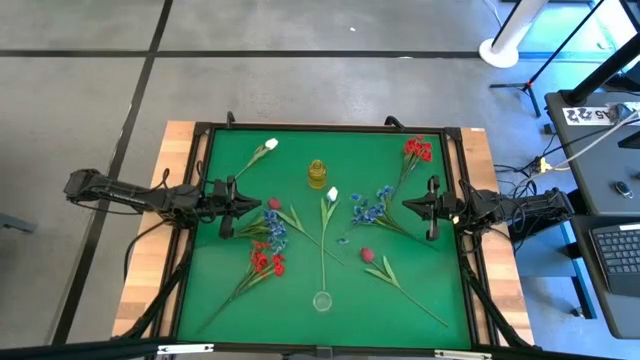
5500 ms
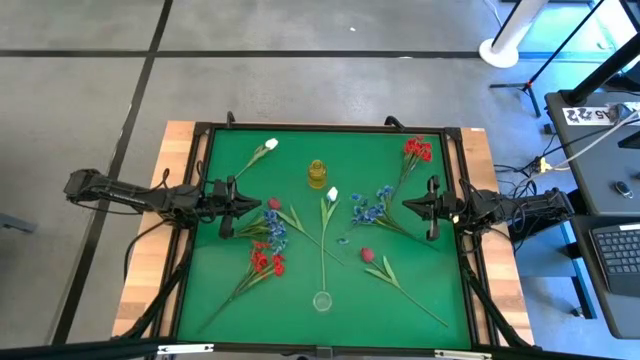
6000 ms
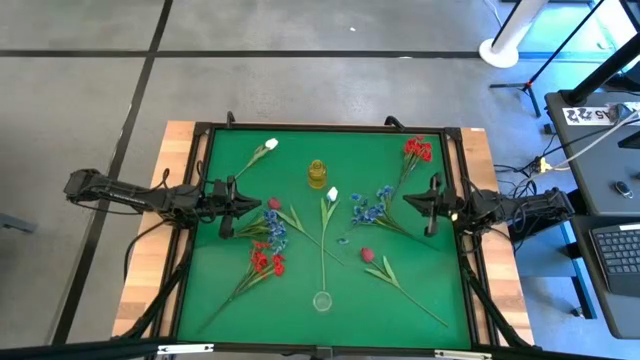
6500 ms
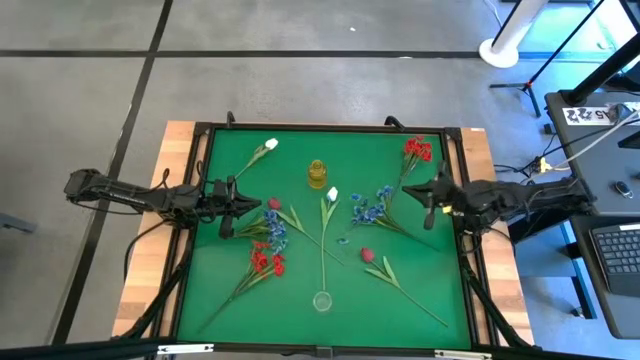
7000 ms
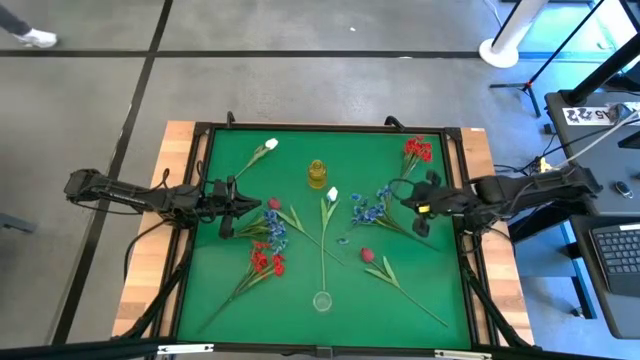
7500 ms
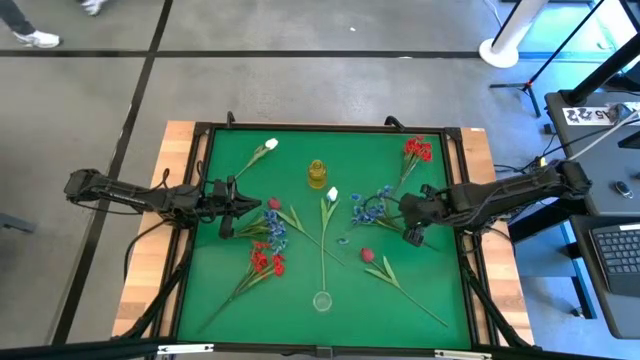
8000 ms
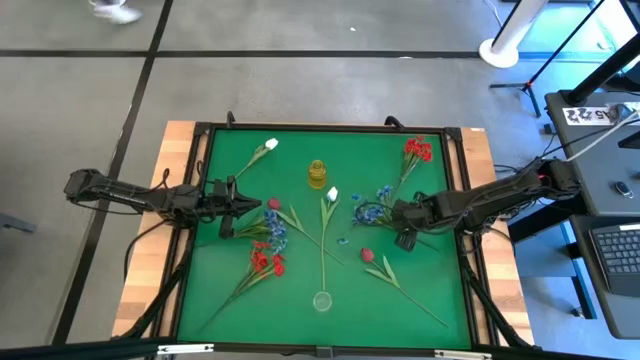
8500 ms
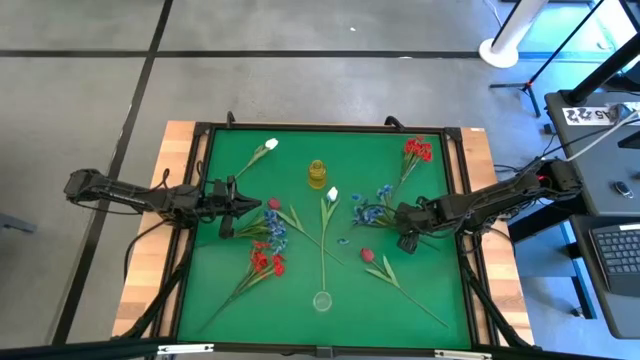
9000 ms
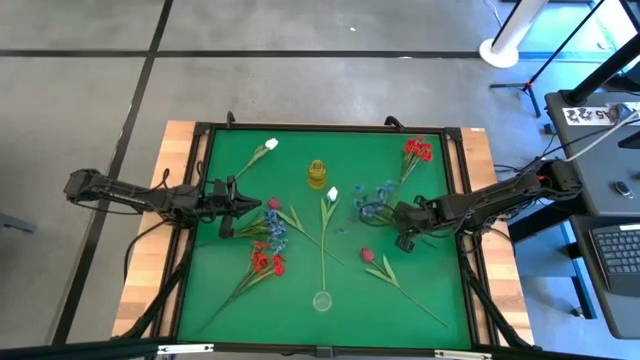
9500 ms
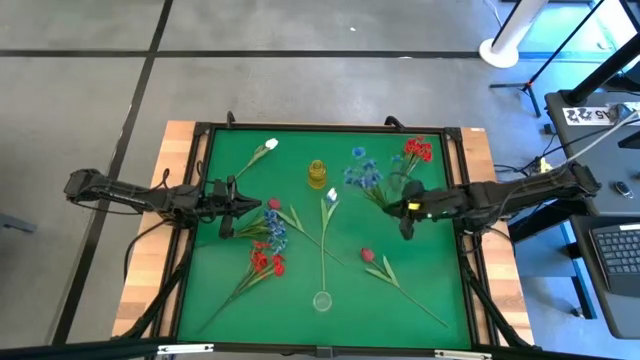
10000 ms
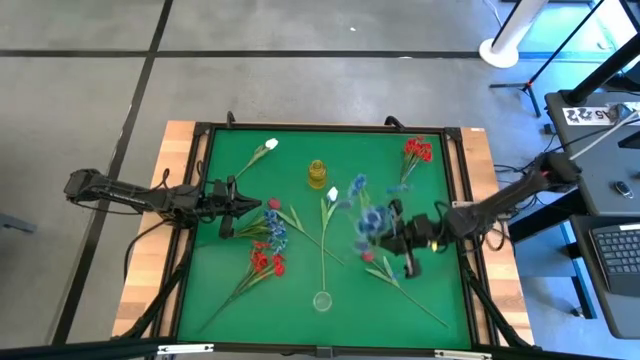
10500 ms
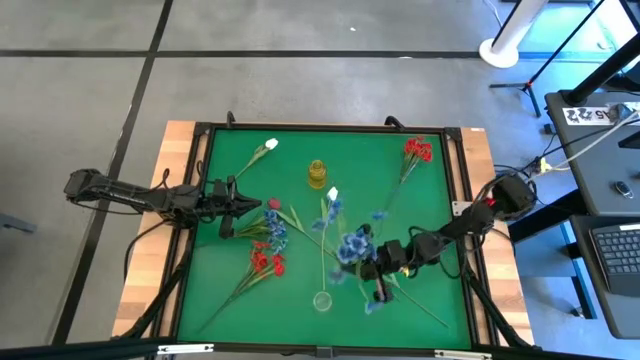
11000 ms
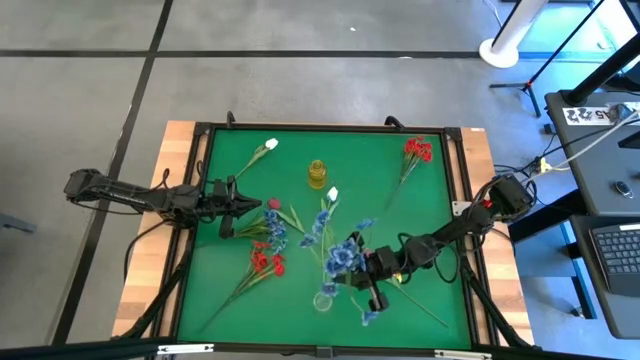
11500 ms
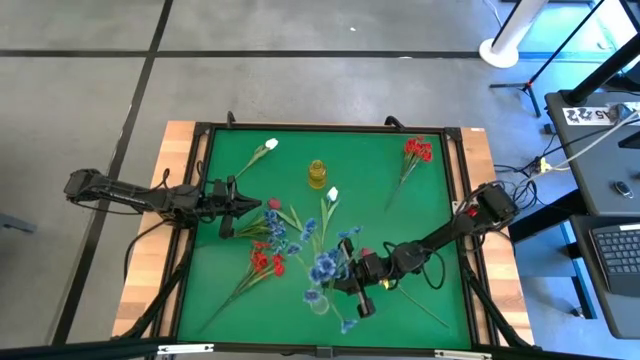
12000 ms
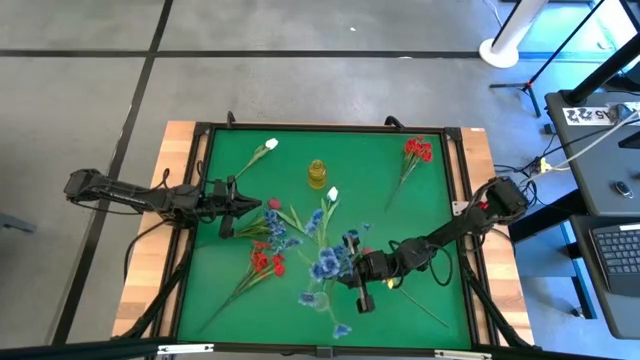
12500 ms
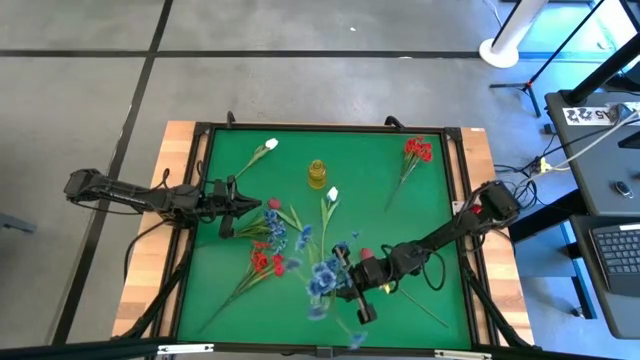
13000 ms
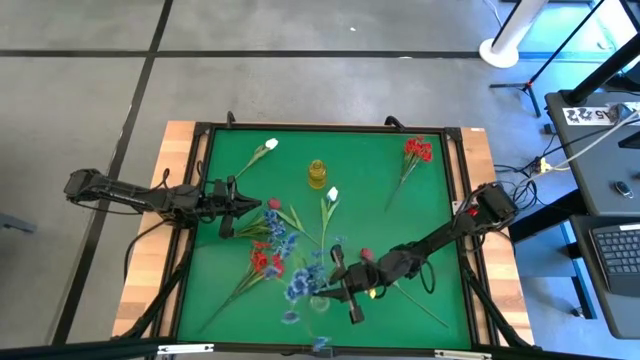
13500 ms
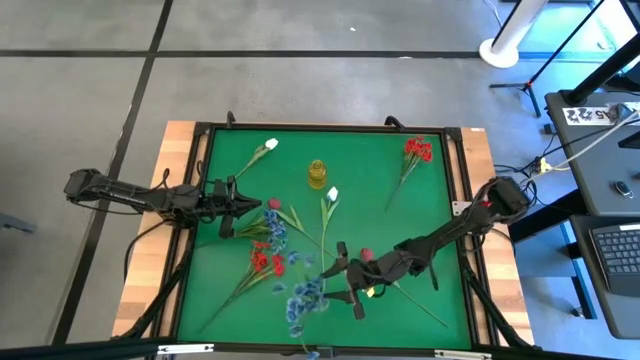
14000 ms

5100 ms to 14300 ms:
Task: Sort flowers into vase by color
Put the right blue flowers into the transparent vase

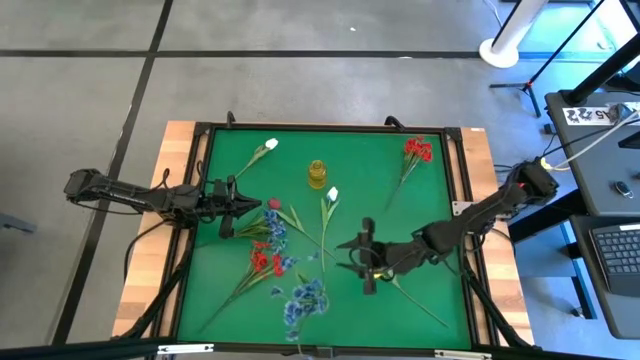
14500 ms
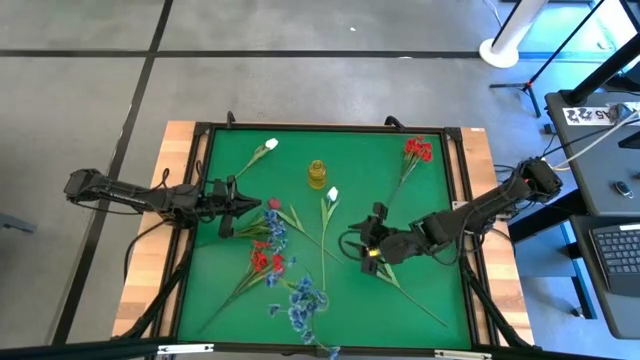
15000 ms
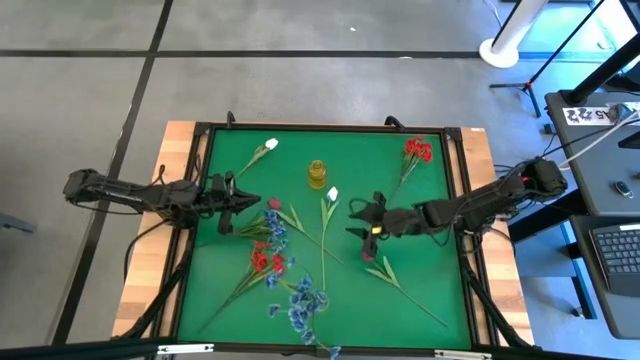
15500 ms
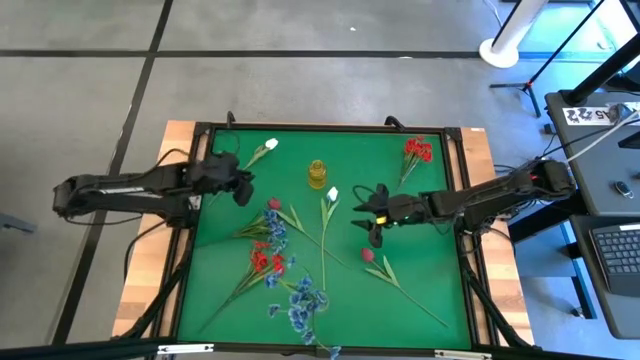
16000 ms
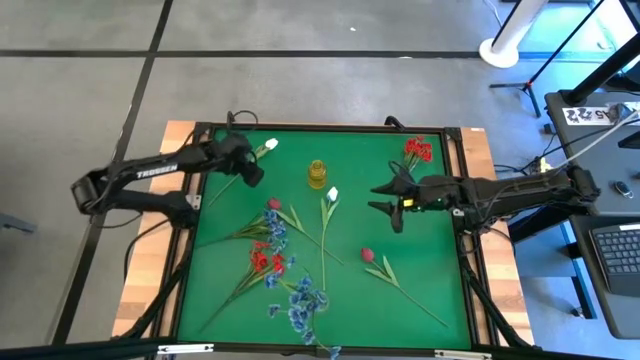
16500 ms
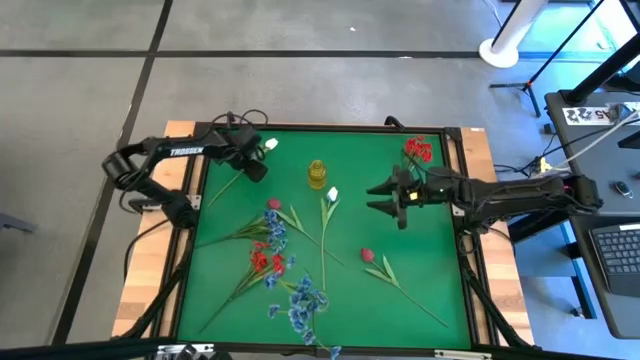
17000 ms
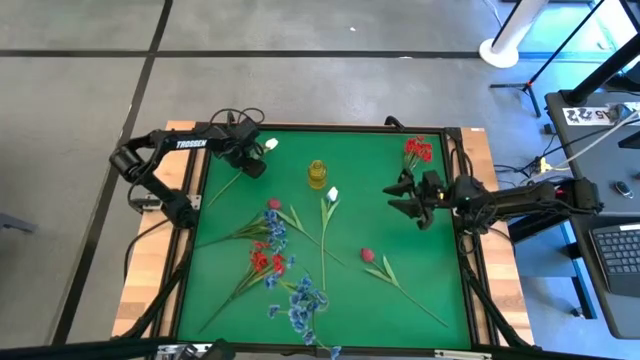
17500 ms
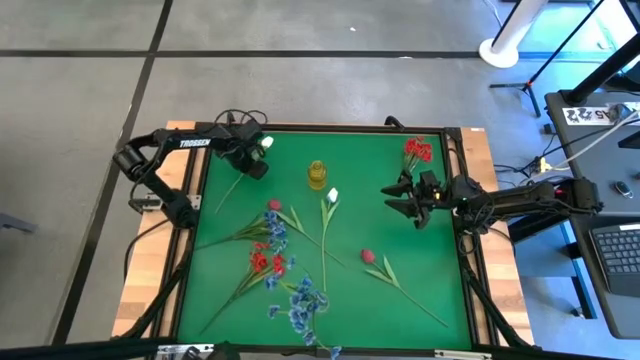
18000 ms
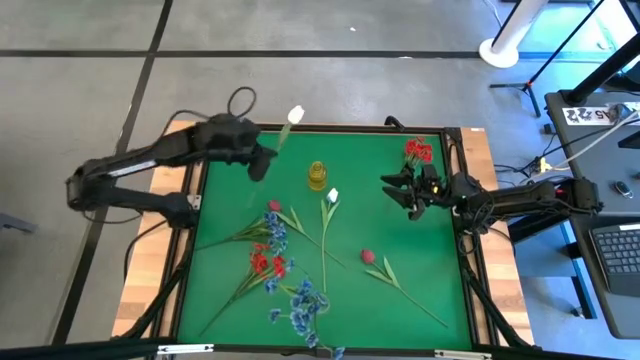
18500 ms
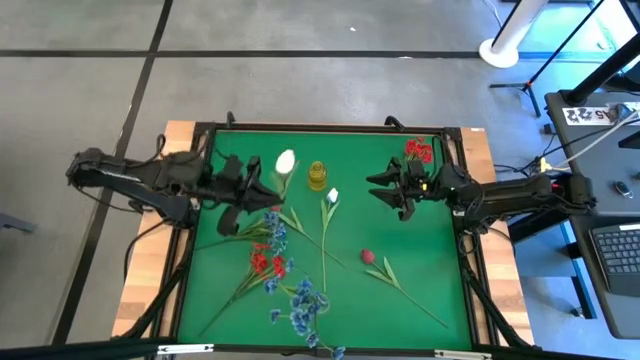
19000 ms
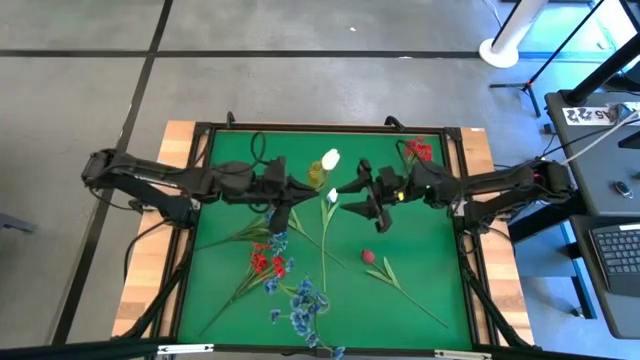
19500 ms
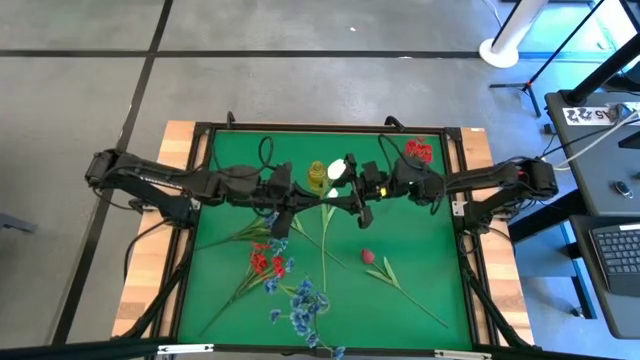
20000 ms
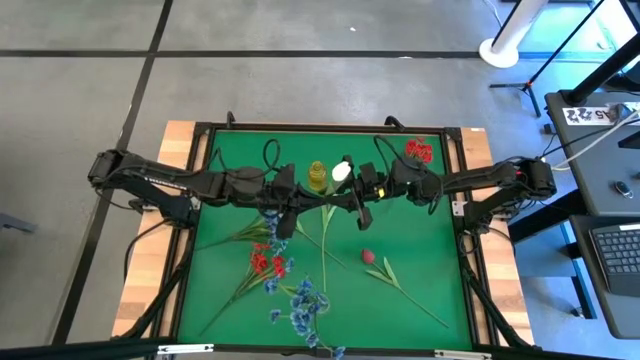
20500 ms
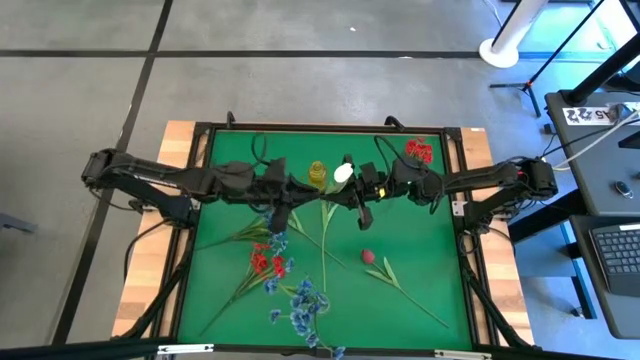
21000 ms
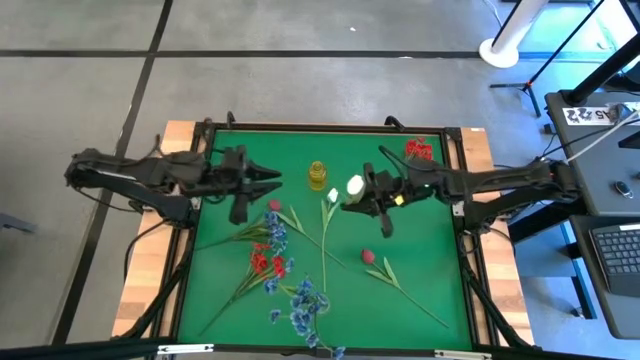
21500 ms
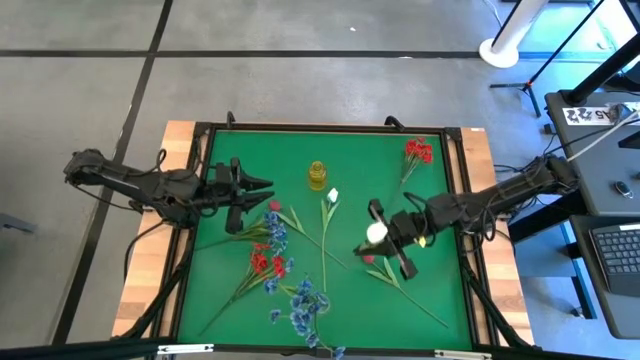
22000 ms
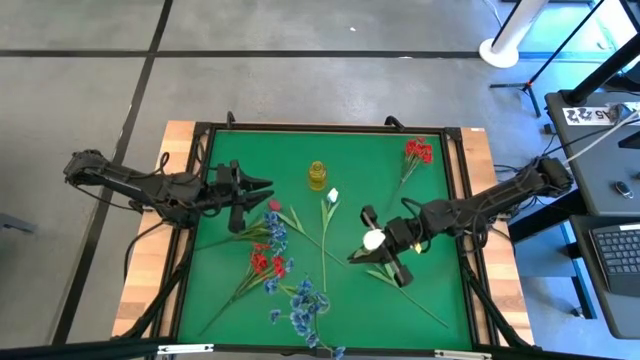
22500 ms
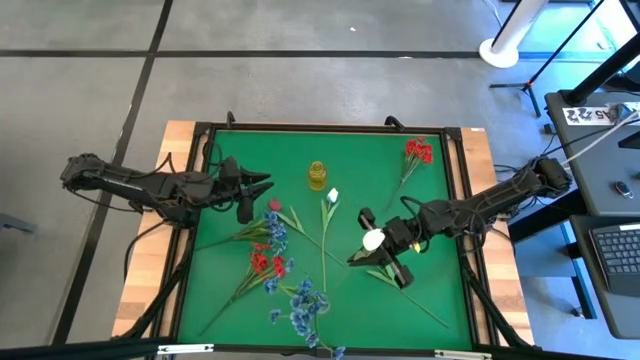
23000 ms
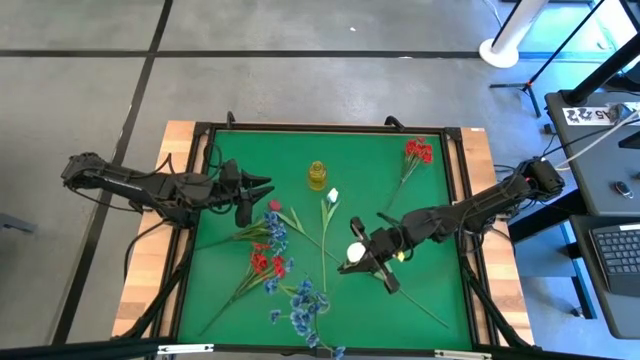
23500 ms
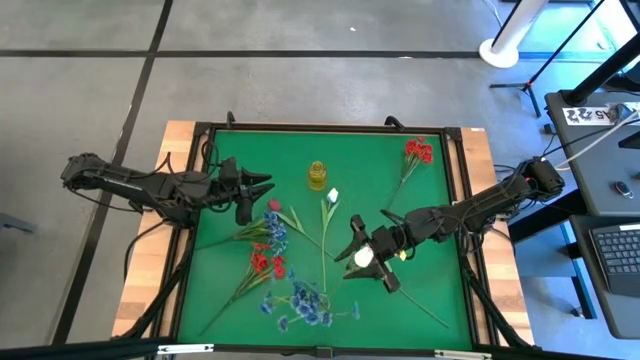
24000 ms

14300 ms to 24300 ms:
Put the top white tulip into the transparent vase

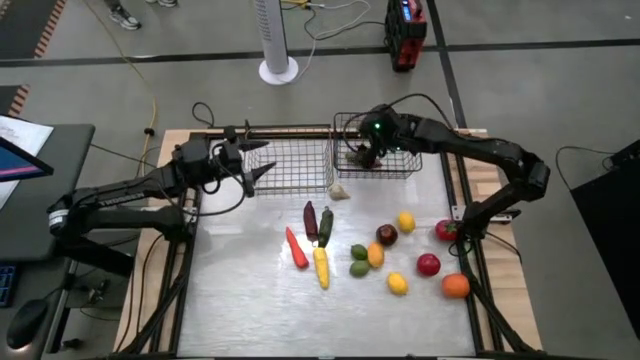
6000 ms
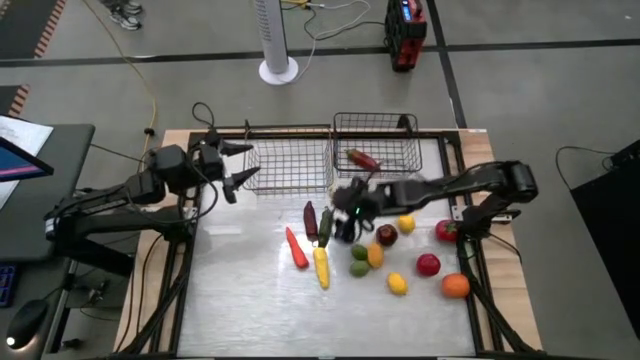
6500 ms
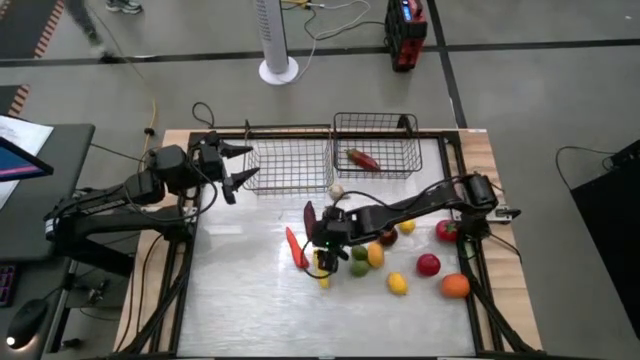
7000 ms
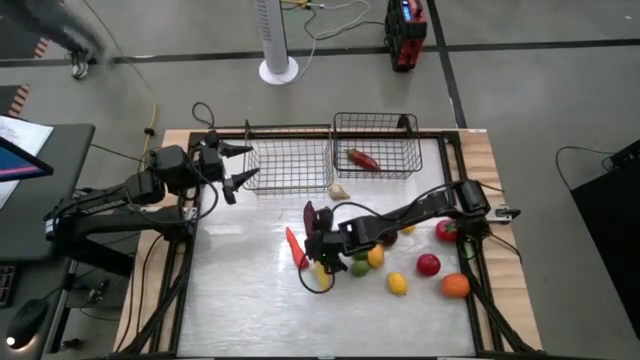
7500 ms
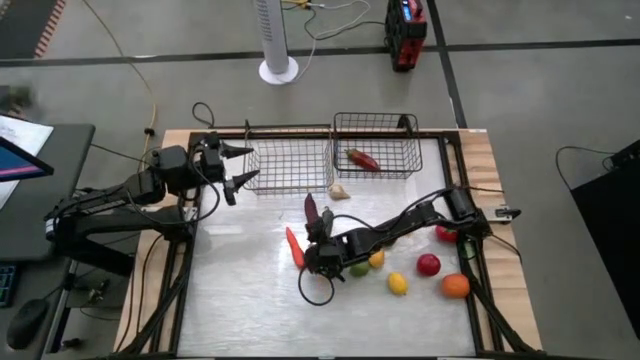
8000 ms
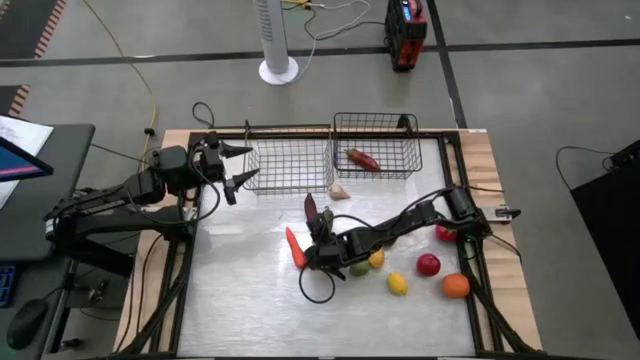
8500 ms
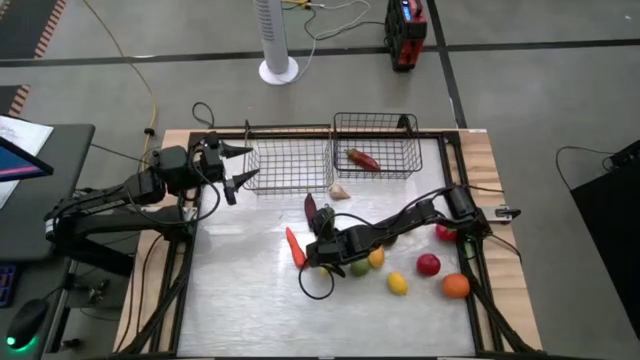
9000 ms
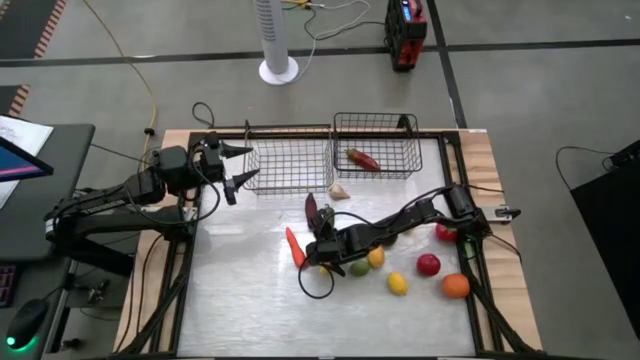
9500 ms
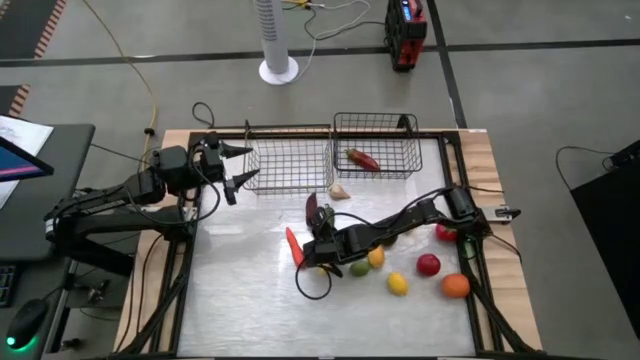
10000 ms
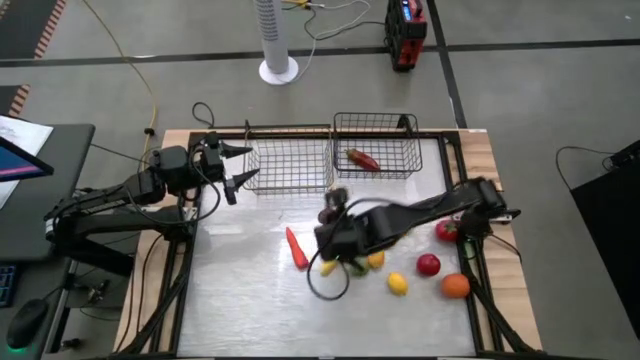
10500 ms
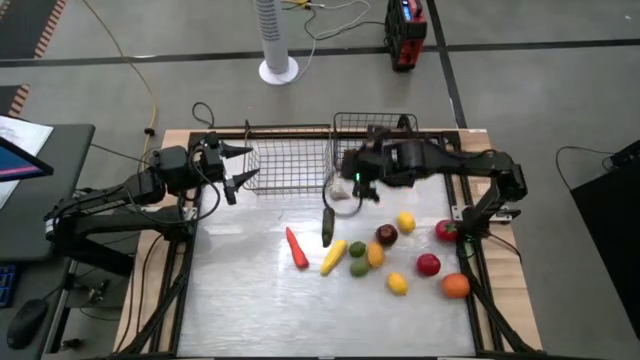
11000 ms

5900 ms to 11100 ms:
Task: Sort produce into baskets
Put the dark red chili pepper into the right wire basket
